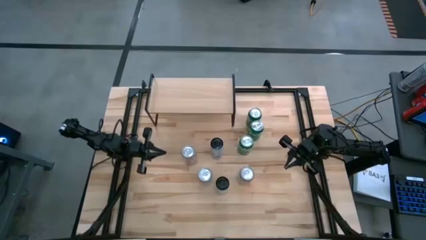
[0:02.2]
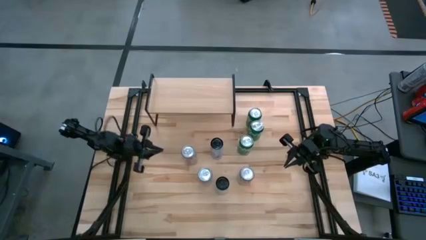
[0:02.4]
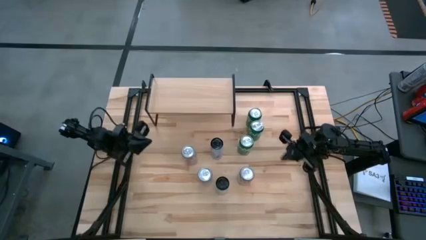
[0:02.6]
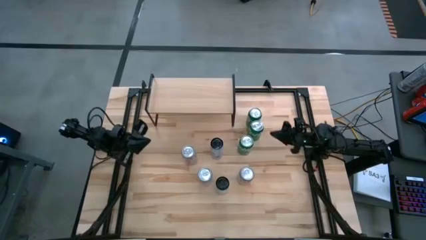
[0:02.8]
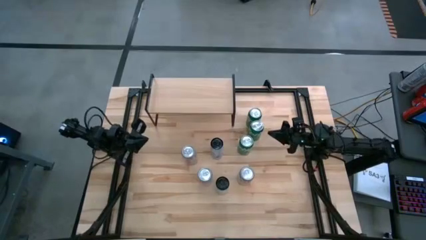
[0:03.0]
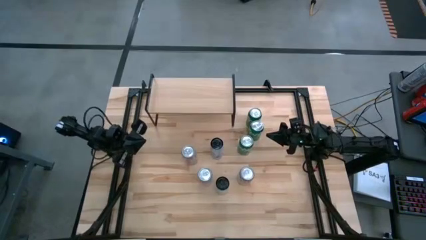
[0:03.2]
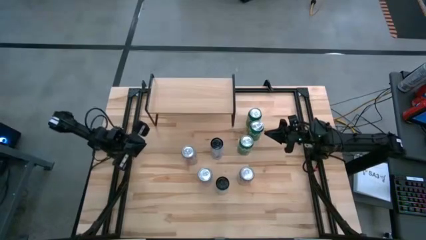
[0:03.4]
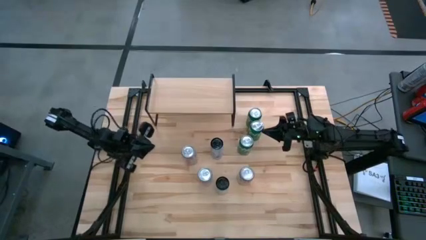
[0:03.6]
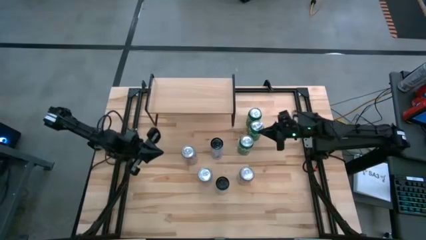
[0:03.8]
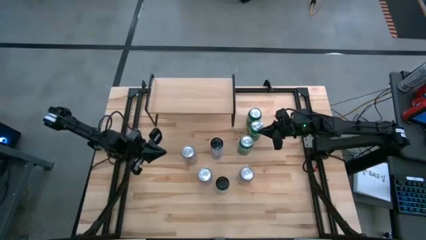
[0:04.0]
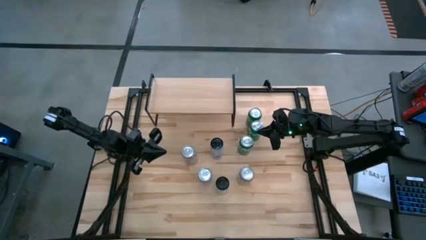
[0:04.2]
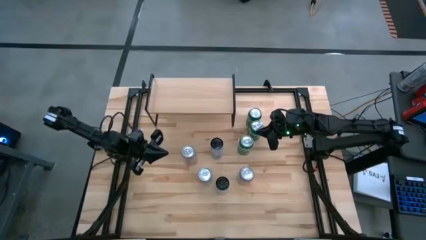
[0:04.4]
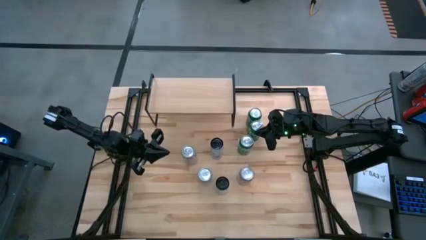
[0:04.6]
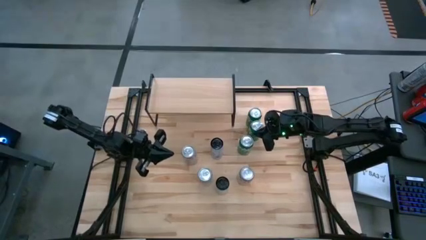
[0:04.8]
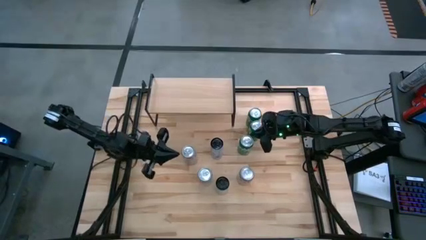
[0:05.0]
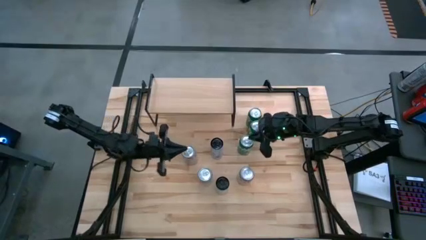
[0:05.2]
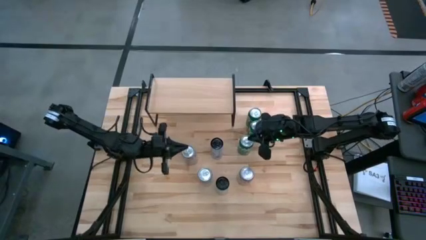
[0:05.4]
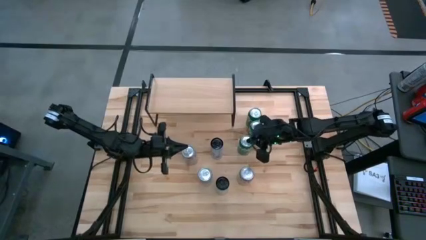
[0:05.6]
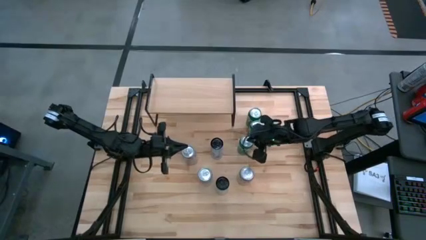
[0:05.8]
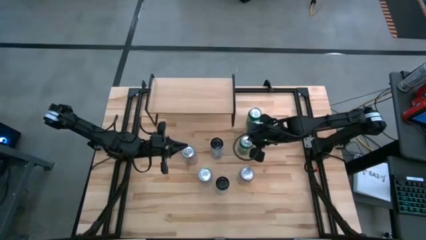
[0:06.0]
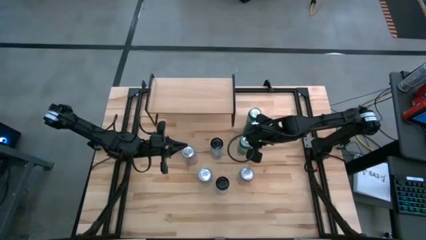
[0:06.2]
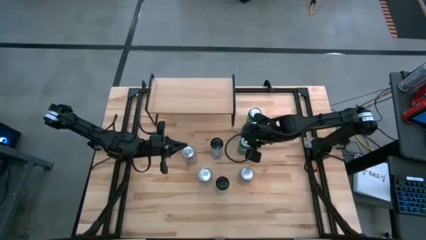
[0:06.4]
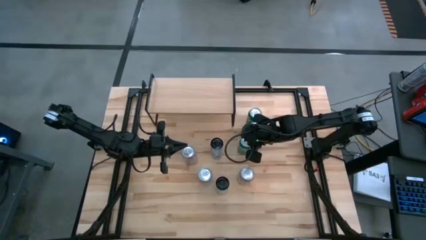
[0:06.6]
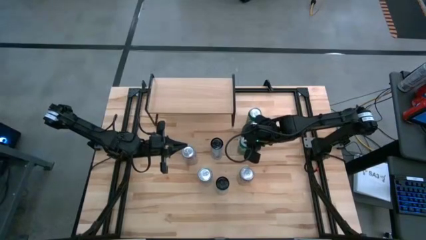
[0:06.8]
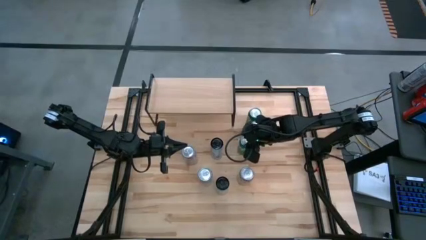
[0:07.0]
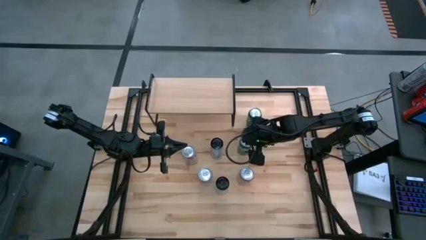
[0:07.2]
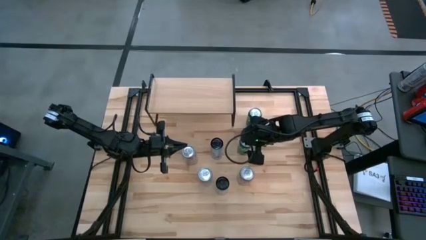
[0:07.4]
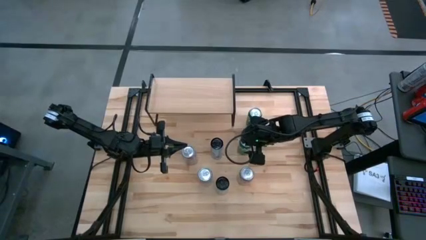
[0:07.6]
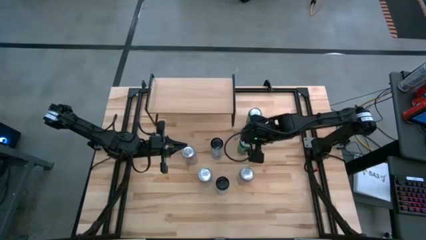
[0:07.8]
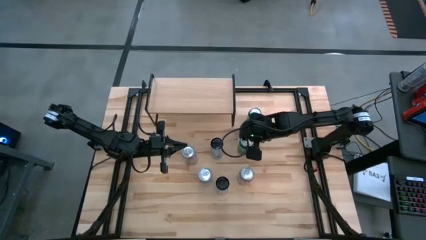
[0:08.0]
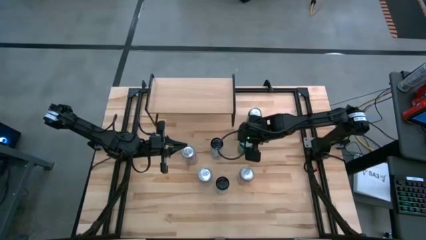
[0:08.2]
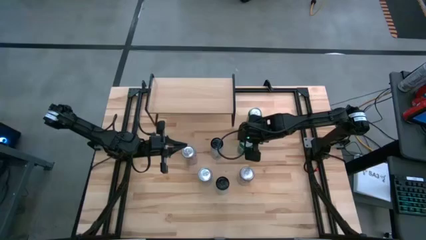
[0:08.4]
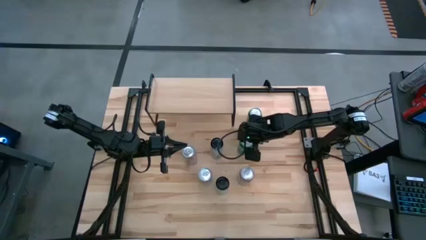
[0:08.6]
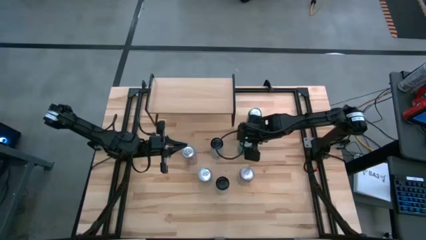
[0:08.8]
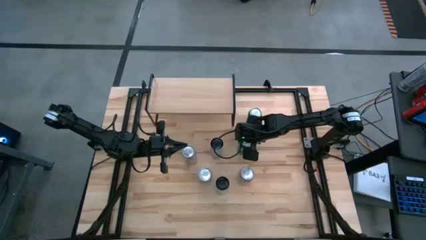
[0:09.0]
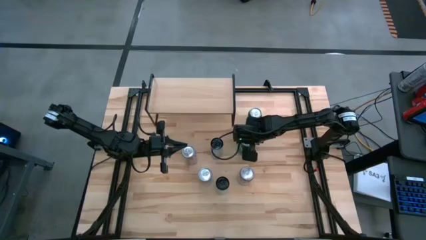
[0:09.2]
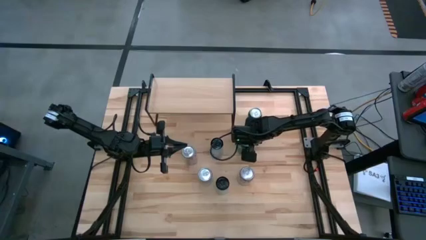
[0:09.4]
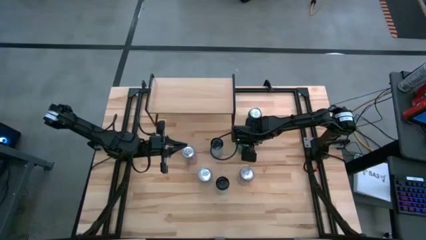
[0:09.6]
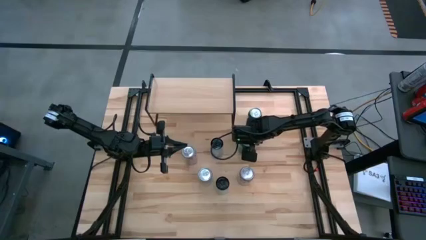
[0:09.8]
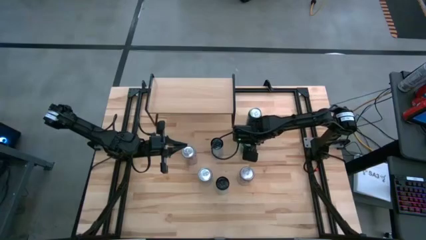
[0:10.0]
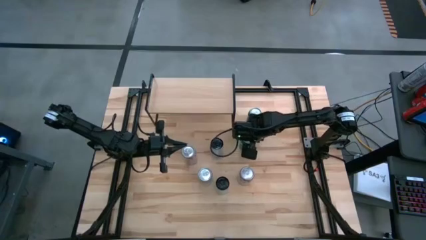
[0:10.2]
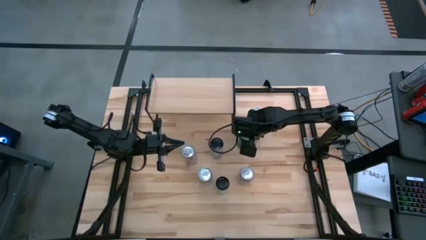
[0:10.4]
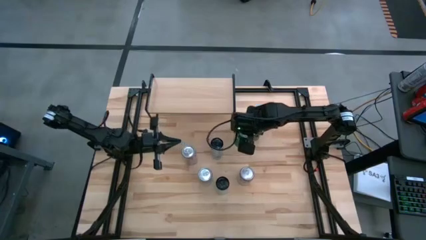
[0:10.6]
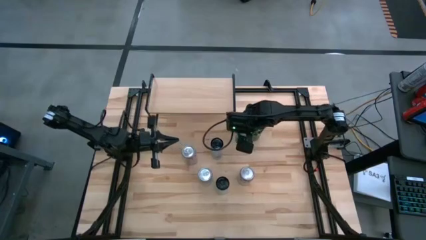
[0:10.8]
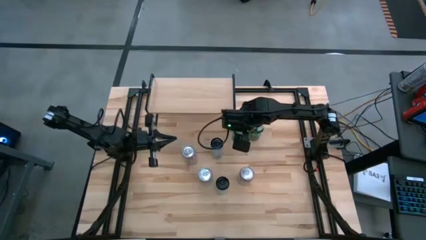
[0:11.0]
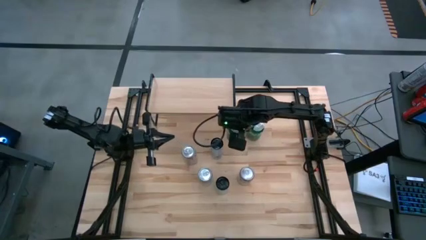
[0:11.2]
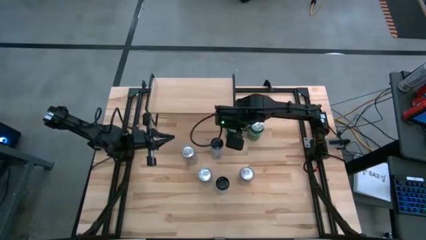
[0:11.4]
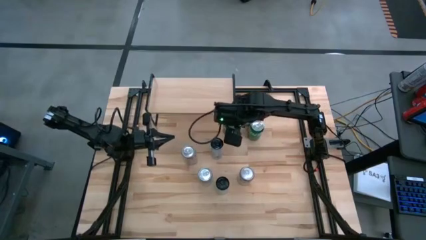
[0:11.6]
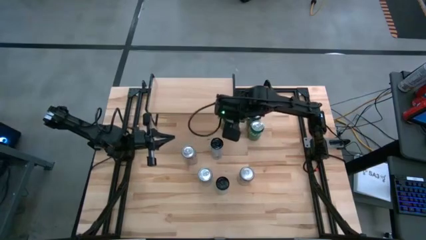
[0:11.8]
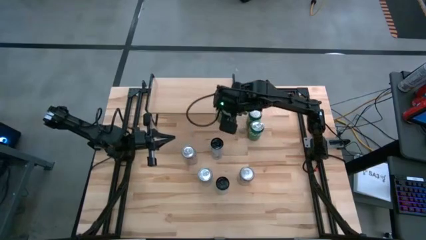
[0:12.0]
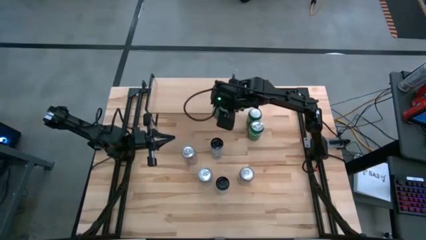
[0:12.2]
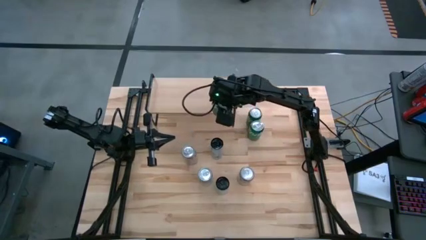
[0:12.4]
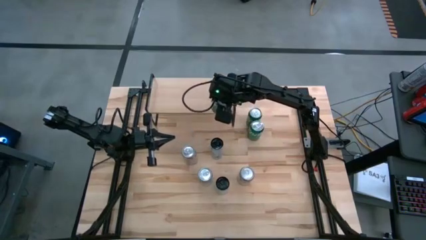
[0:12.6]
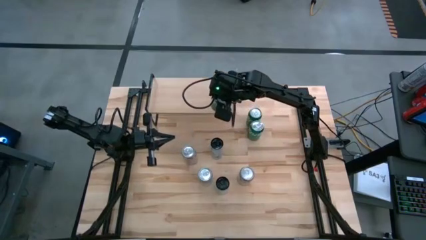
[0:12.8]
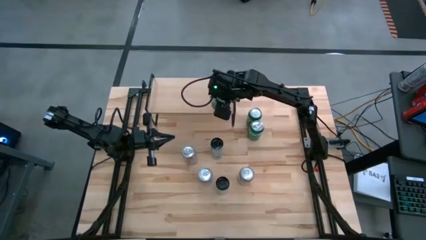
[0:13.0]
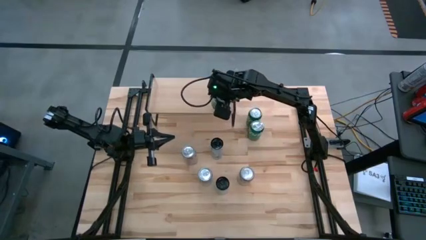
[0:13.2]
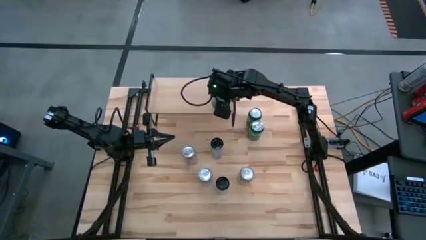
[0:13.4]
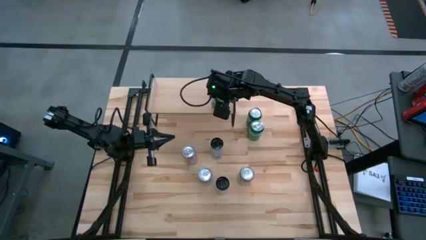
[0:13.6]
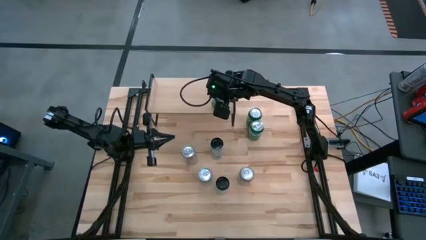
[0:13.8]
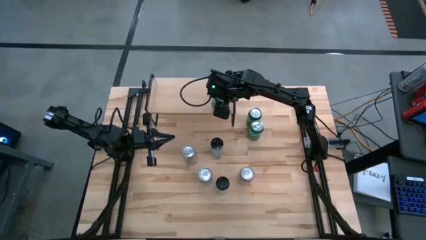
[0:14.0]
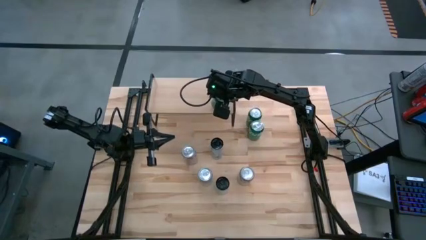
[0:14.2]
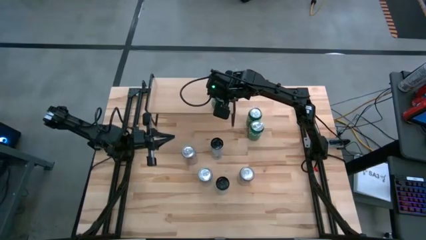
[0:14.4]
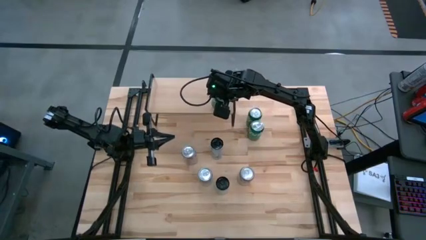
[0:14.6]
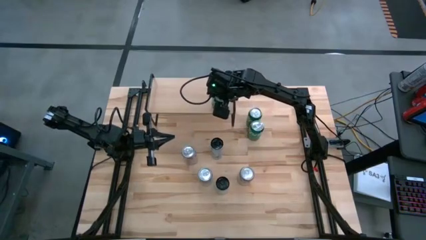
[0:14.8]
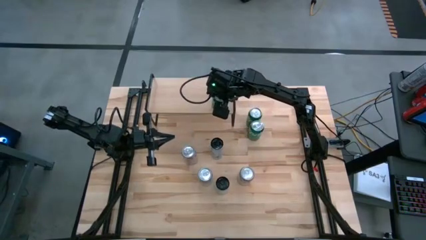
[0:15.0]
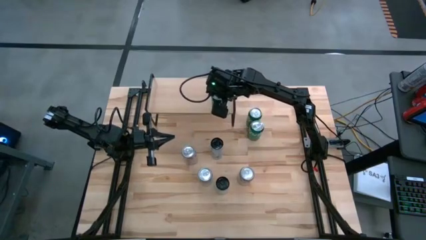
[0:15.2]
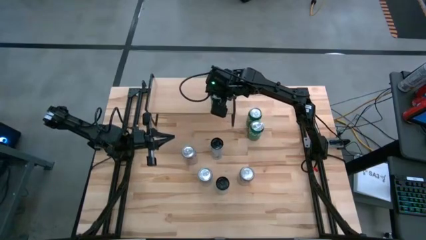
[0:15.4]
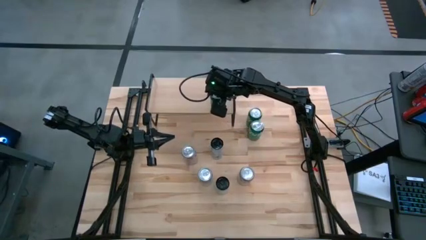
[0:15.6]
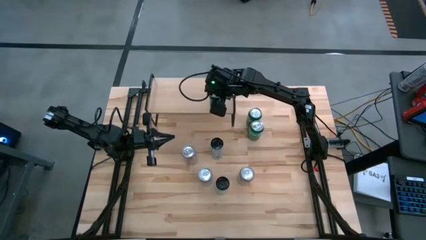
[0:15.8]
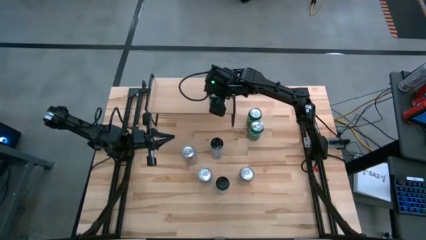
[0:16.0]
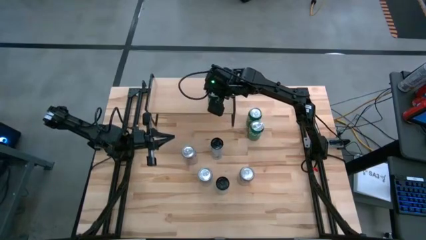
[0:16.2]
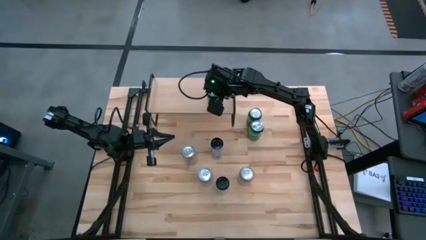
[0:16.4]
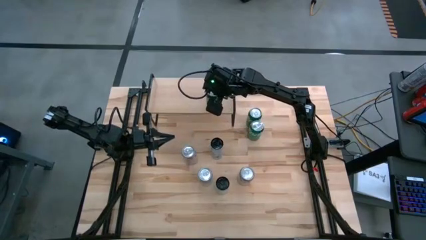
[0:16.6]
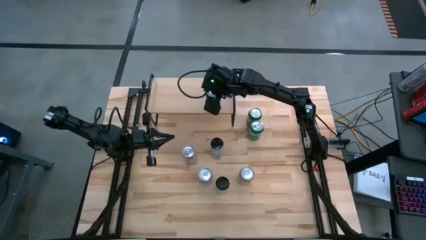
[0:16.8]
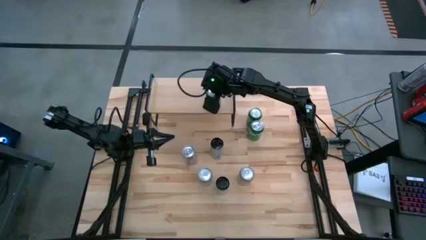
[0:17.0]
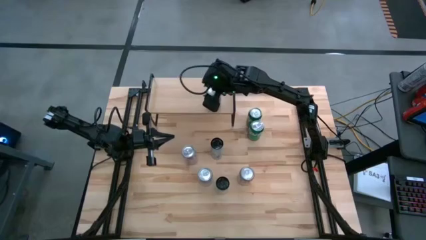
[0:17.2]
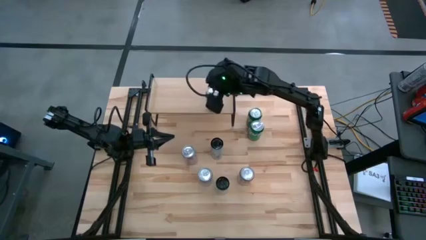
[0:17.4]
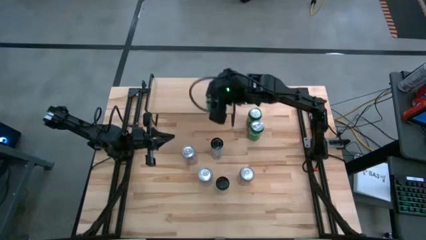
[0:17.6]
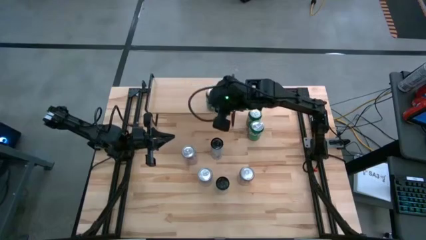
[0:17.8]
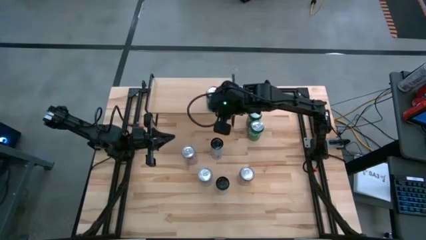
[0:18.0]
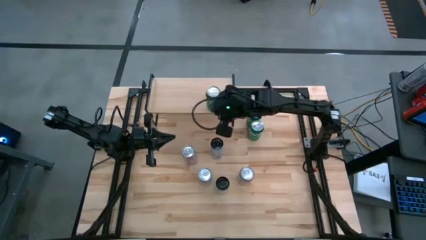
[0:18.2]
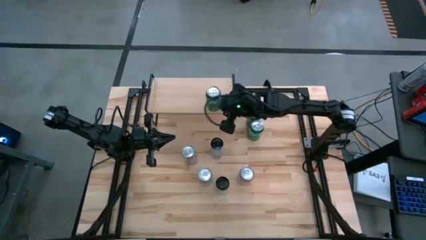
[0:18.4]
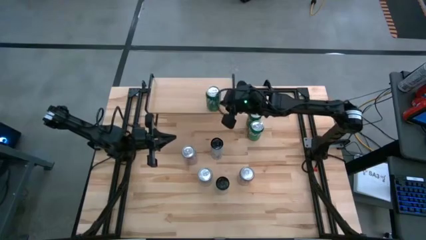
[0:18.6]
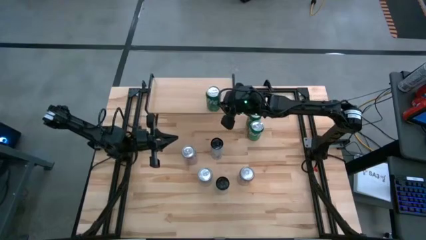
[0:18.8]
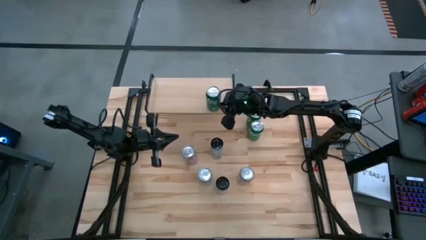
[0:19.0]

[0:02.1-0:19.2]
Task: Place canned beverage on shelf
Put the bottom green soda can on the shelf
